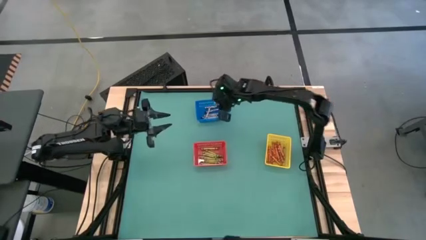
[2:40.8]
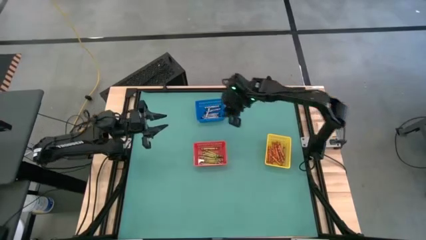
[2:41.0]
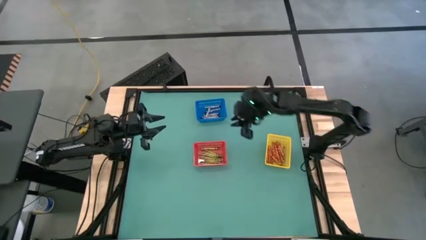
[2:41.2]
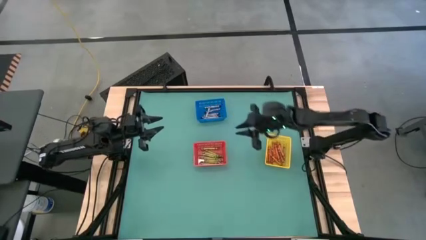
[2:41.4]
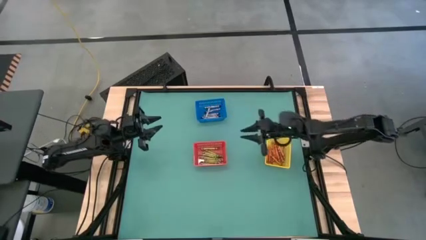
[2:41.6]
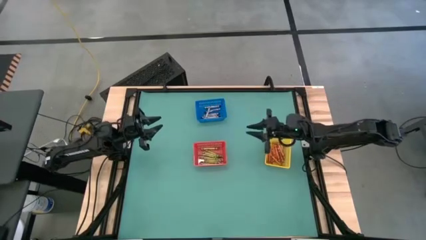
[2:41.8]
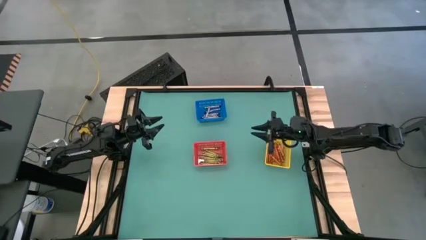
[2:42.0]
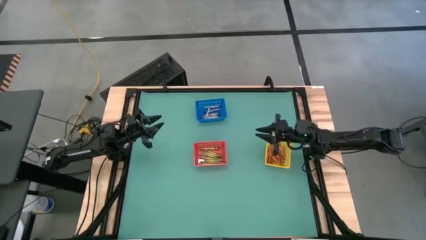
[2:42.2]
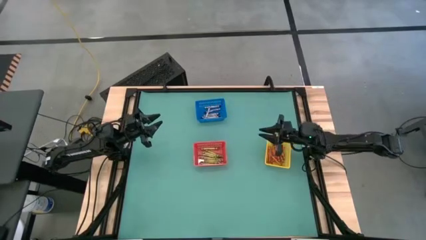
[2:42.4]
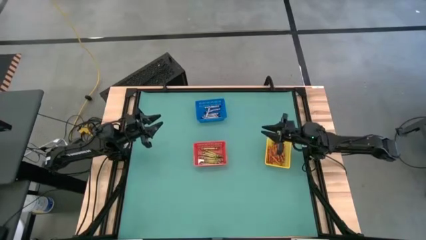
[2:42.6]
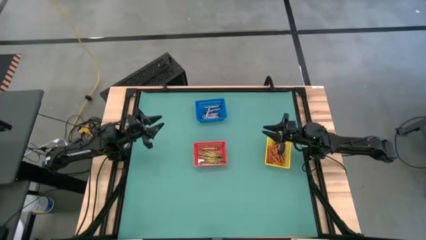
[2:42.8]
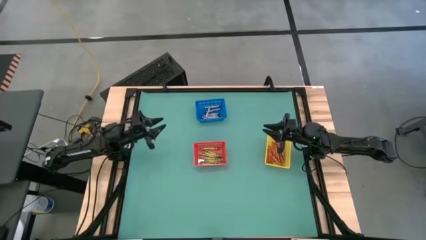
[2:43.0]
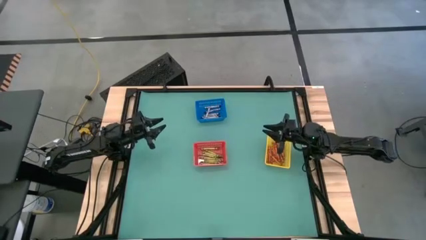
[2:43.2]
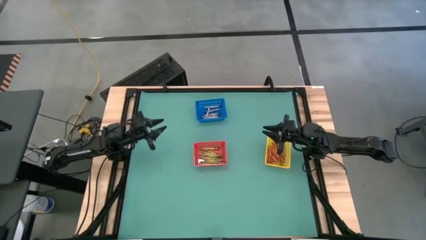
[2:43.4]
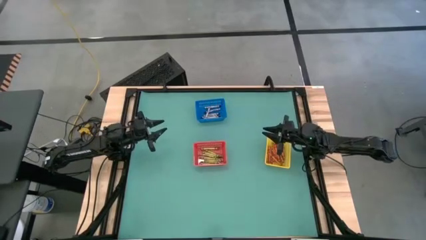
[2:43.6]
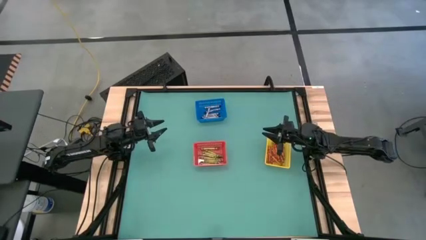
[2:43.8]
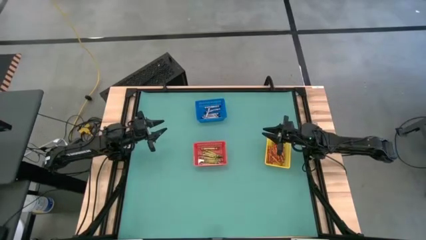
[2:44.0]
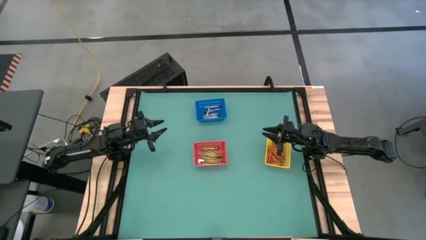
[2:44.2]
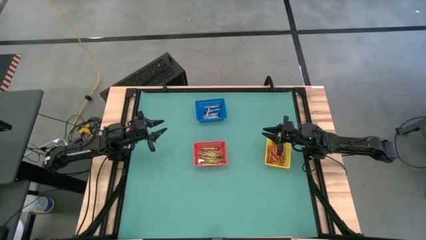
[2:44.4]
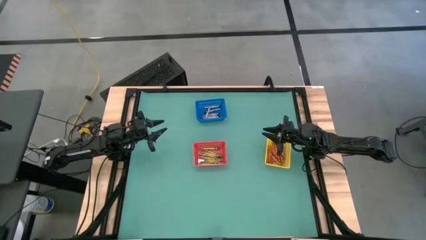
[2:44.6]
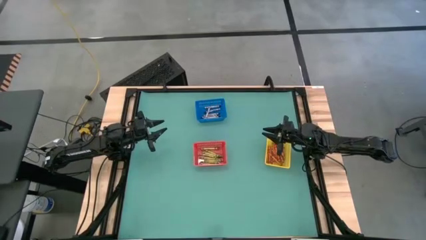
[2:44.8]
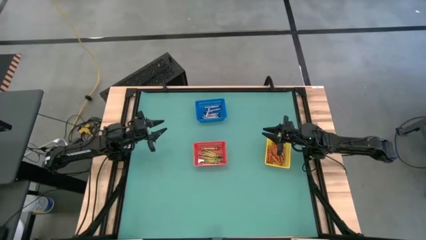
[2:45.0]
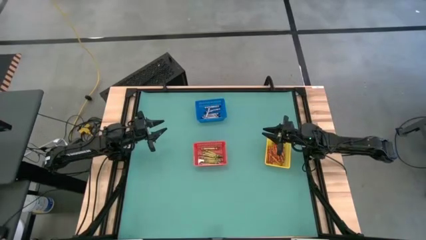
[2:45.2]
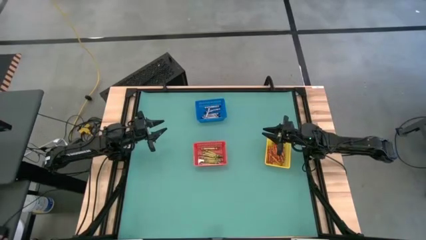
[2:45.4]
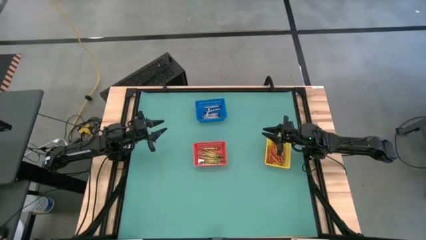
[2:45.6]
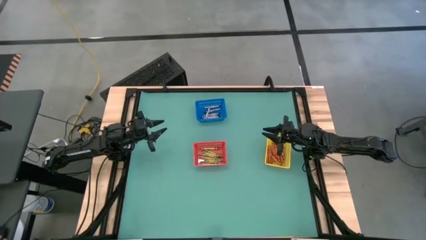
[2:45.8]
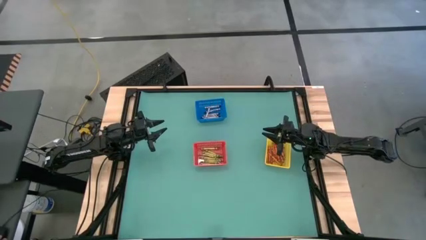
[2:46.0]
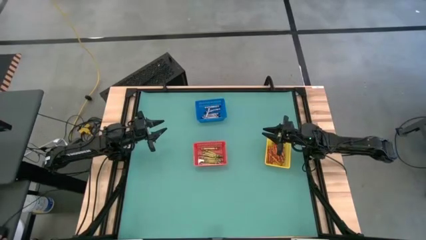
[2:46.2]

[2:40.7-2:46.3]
Task: Sort crayons
Return to Home Position

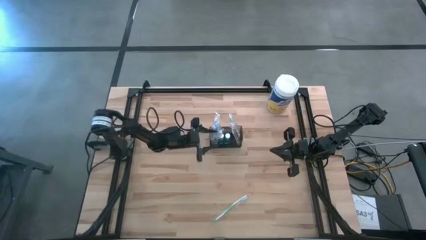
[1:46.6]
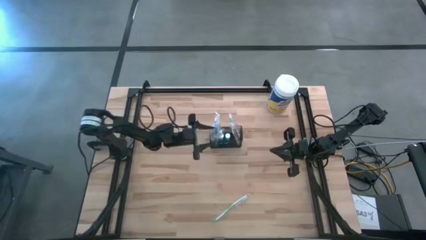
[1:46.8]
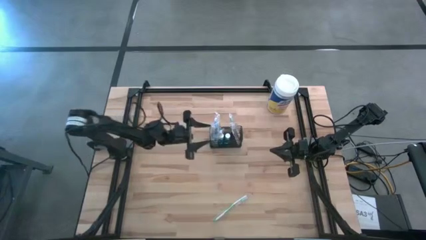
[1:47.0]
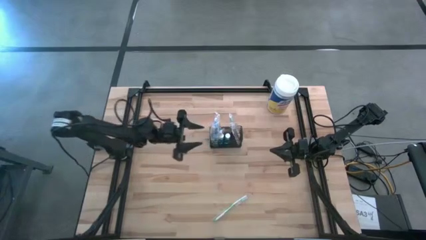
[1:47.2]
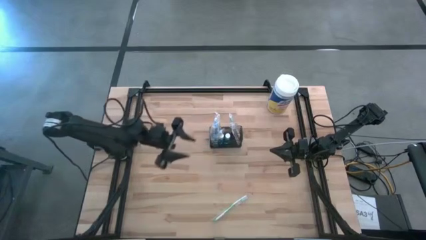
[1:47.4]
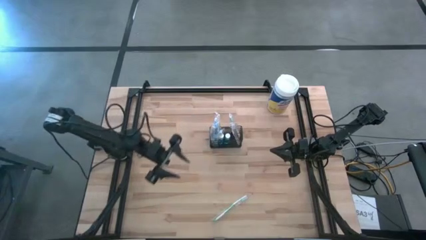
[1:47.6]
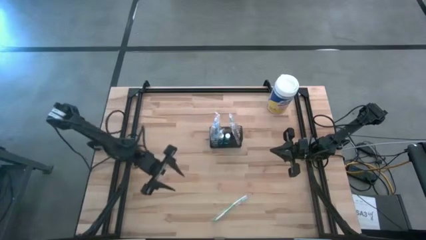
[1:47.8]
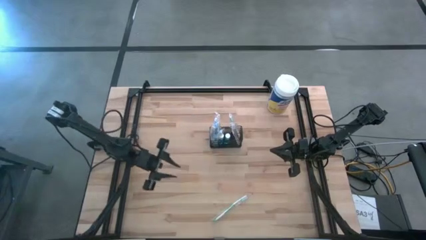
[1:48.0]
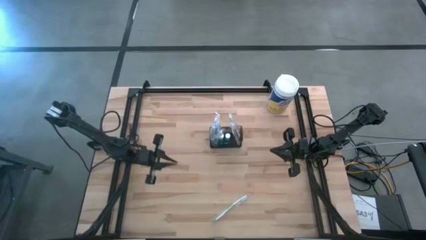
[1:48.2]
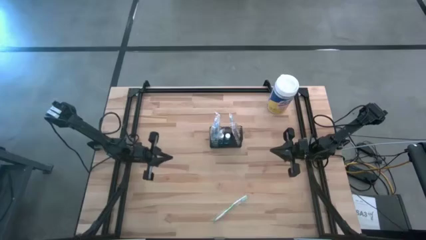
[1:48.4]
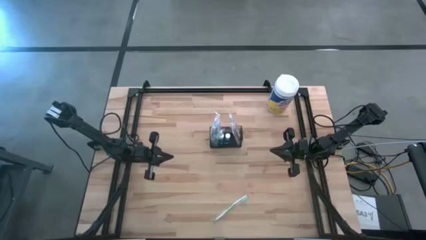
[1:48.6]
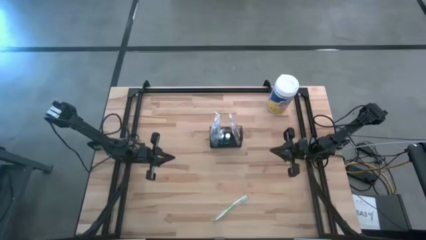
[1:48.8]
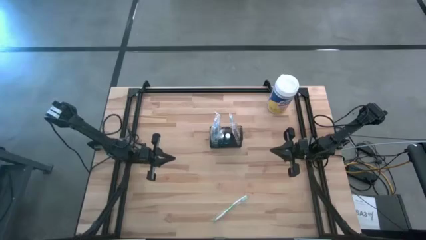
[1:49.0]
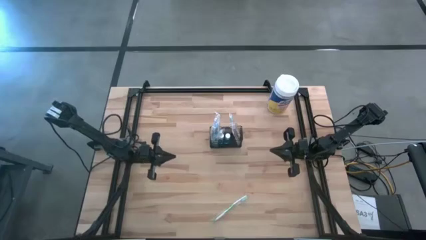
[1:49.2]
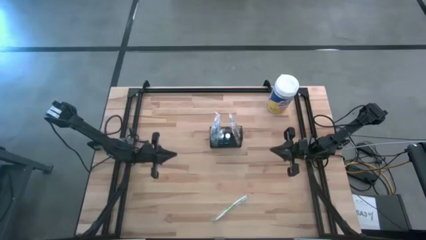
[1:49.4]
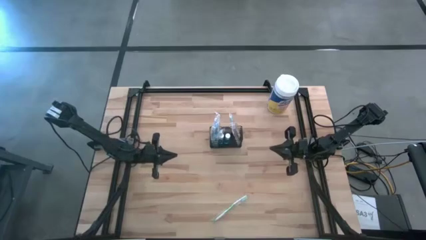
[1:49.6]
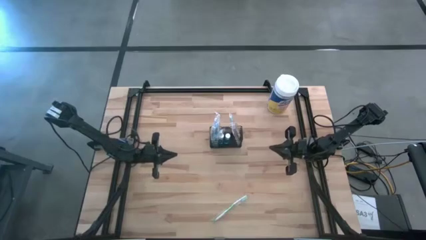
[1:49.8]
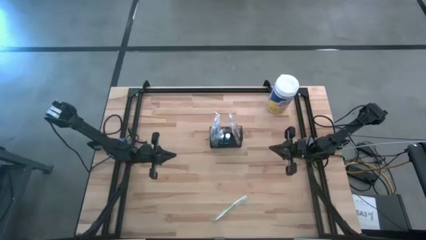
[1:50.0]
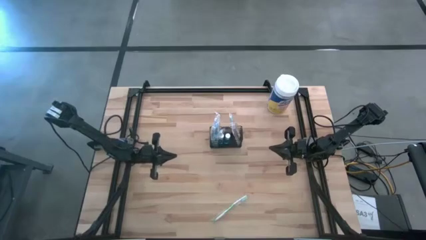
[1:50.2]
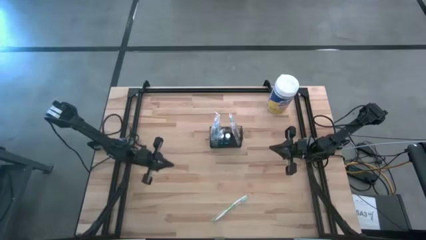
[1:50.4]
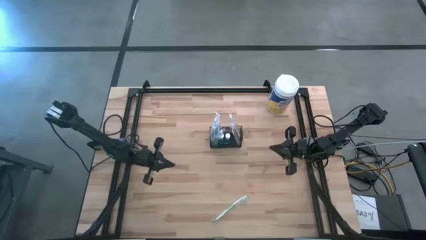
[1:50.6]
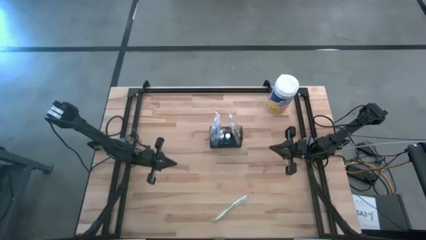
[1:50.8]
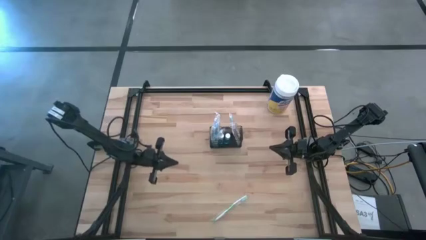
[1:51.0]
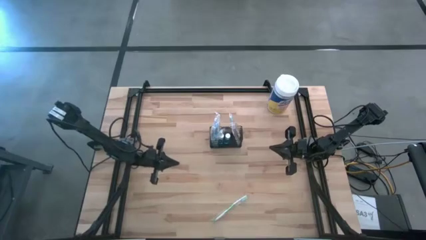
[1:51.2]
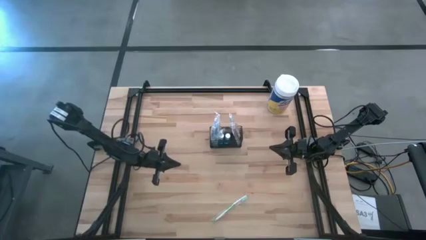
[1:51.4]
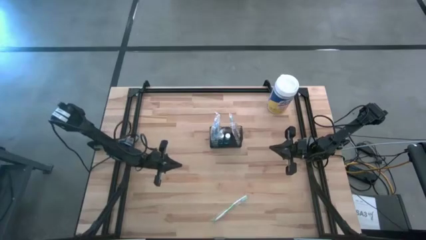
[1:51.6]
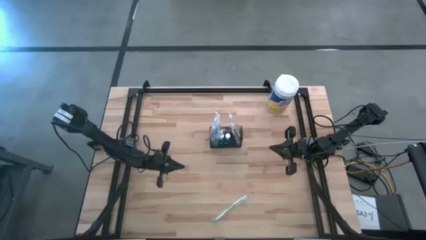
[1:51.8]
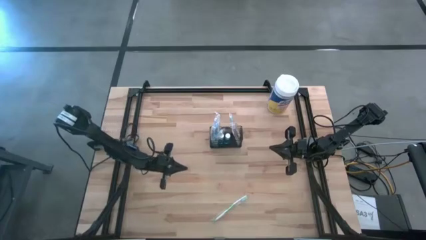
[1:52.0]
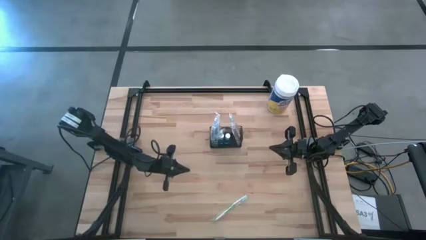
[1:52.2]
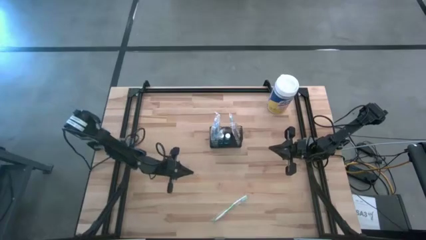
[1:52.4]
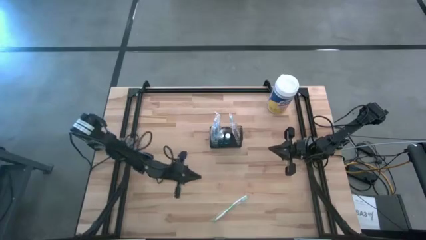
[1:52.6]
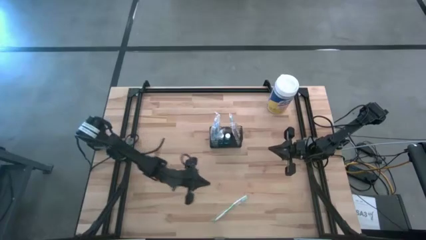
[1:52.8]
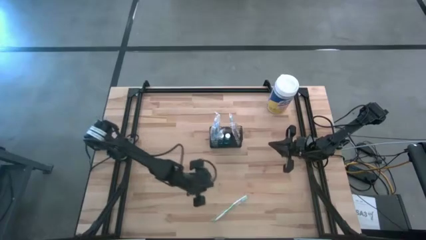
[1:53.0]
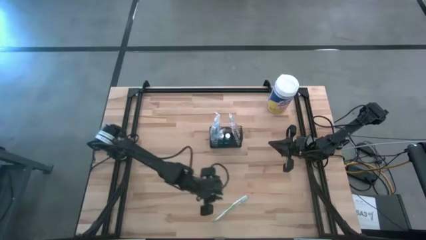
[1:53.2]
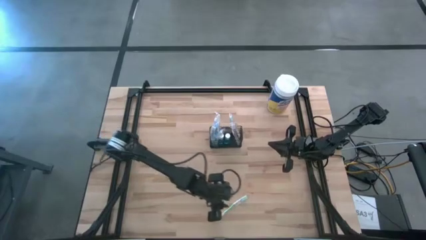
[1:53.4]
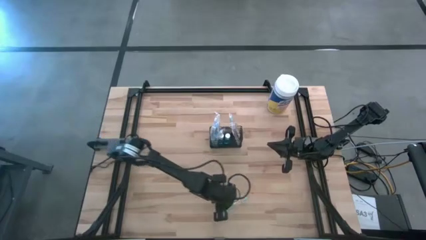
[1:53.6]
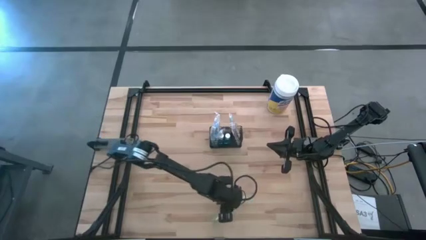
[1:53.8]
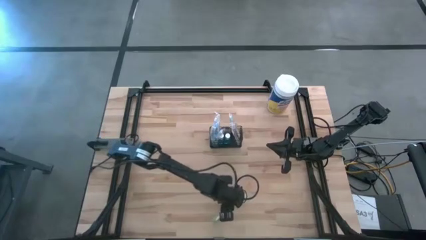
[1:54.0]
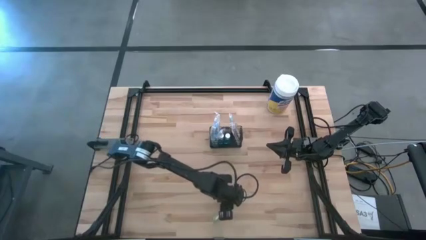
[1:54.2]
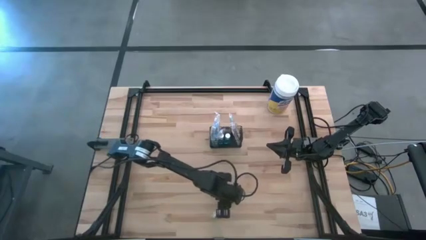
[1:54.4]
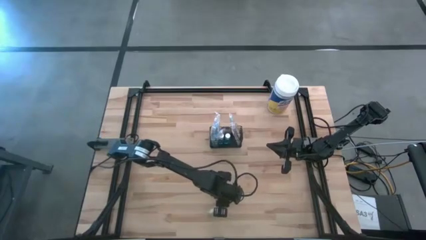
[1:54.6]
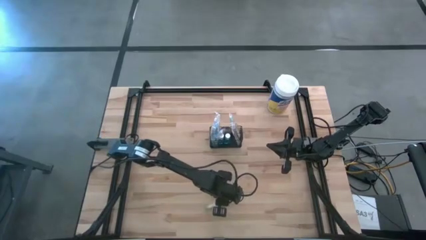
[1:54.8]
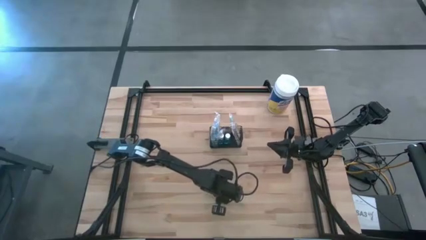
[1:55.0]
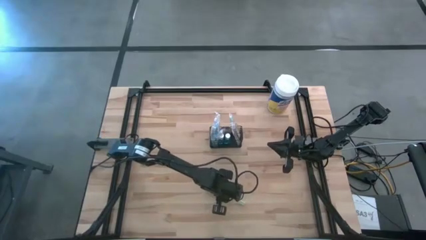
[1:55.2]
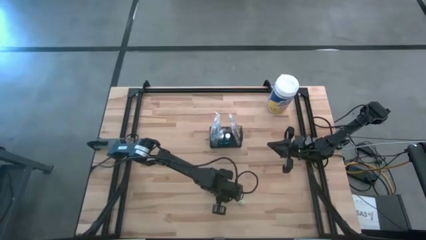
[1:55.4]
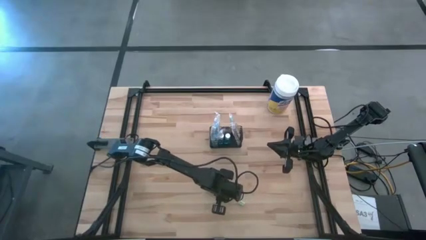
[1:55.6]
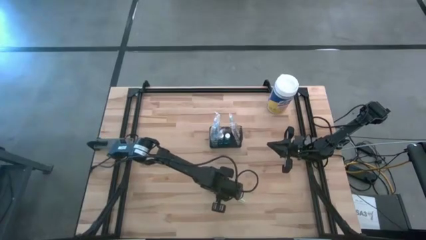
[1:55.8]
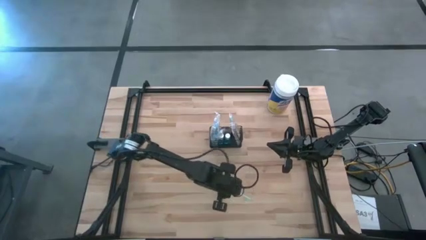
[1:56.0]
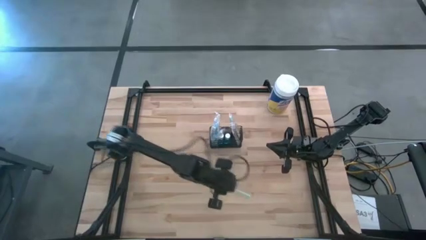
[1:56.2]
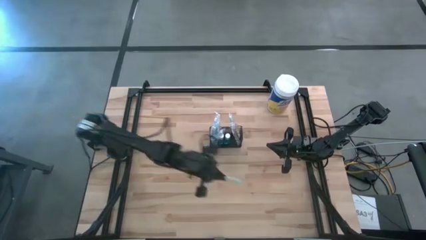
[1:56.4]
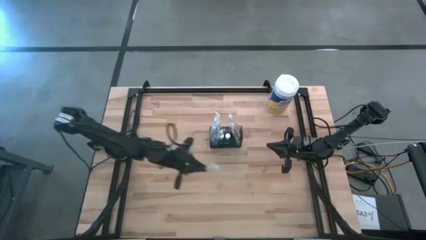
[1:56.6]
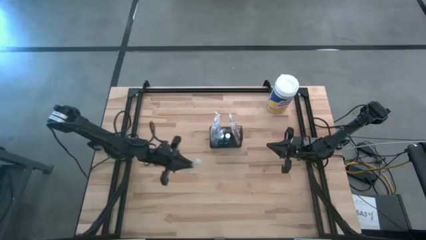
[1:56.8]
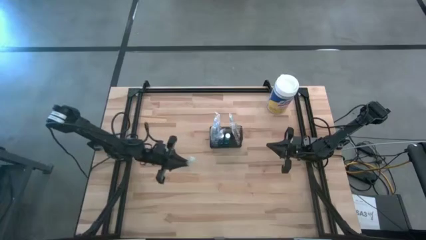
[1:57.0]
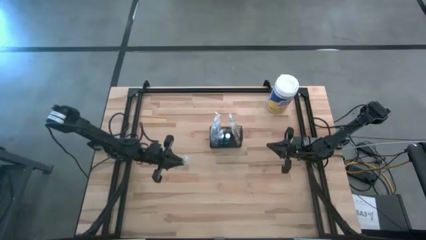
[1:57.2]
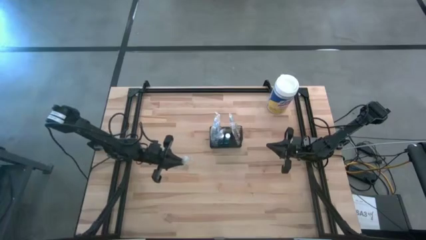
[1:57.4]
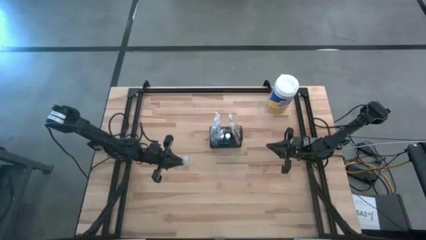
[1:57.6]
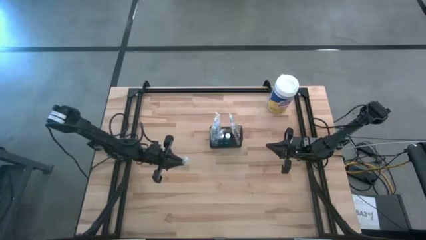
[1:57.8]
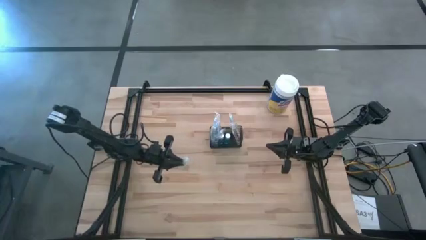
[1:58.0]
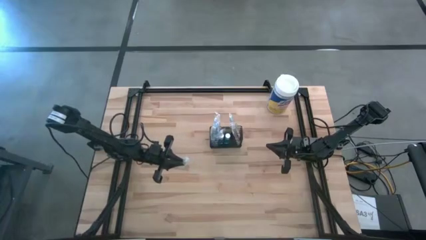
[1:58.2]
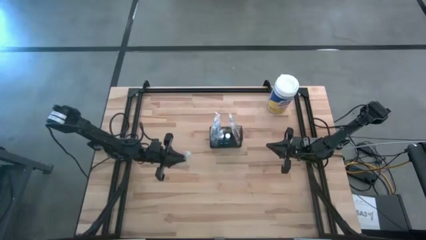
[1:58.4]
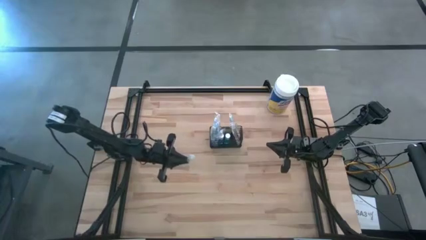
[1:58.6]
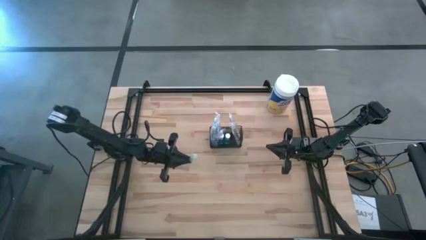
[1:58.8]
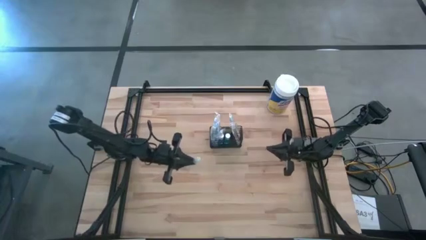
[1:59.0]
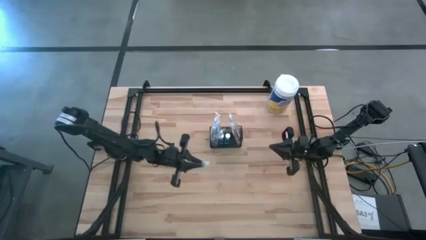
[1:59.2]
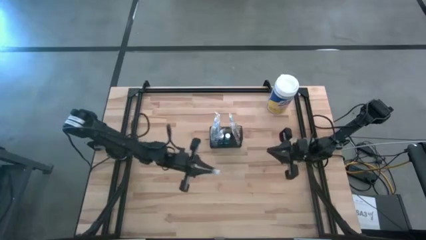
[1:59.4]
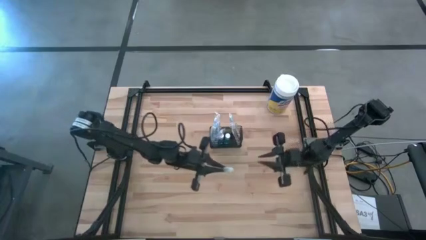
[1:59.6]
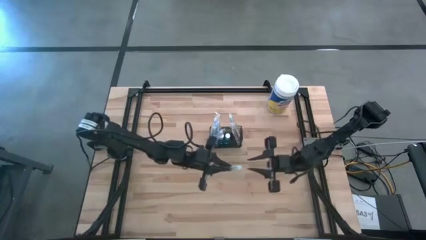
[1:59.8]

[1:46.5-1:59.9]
Task: Pick & Place toothbrushing station
Put the green toothbrush into the black wire organizer
